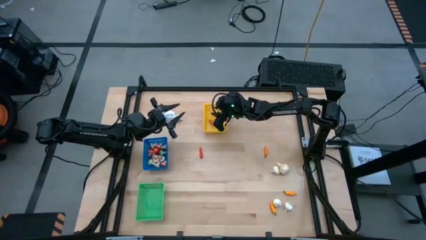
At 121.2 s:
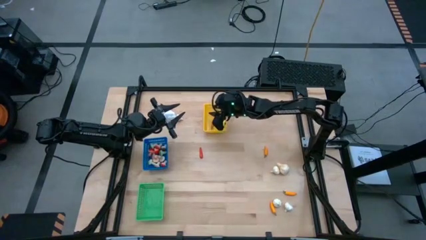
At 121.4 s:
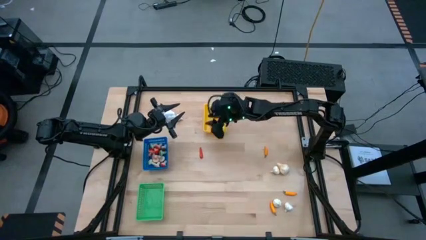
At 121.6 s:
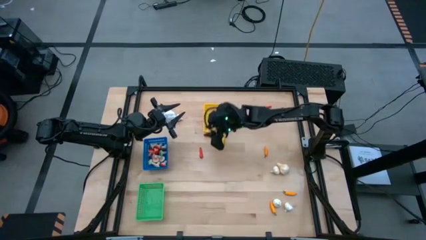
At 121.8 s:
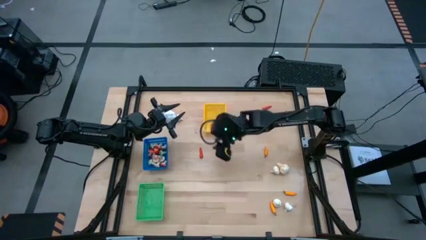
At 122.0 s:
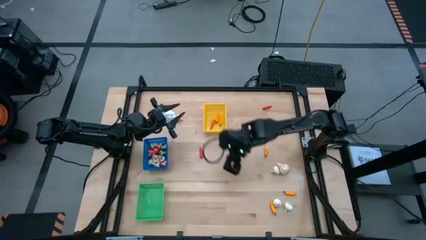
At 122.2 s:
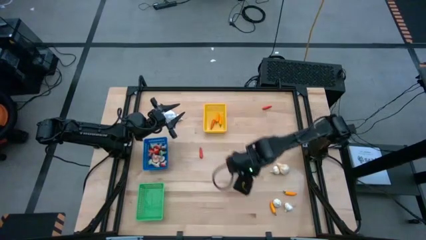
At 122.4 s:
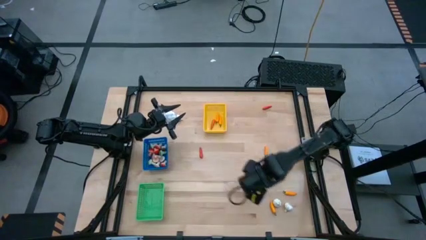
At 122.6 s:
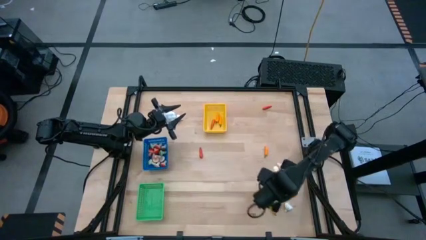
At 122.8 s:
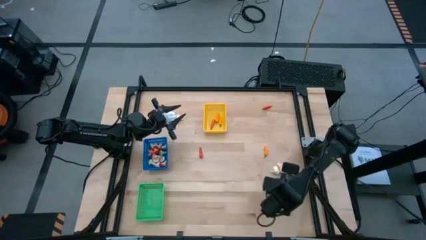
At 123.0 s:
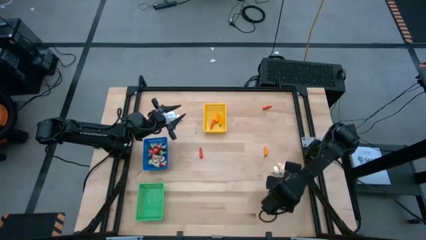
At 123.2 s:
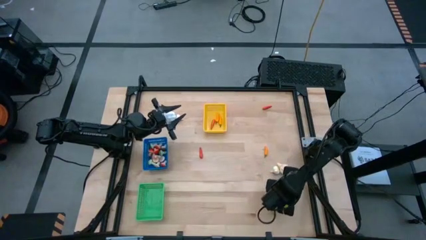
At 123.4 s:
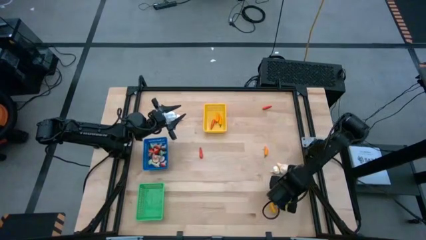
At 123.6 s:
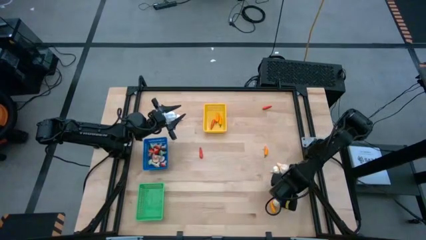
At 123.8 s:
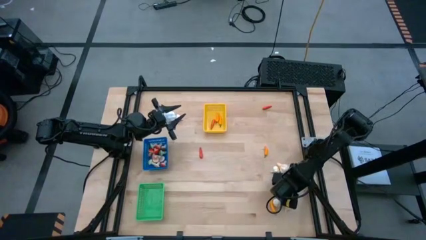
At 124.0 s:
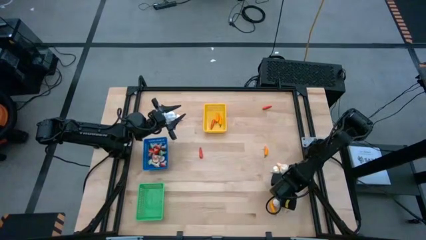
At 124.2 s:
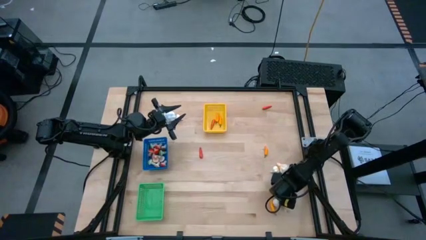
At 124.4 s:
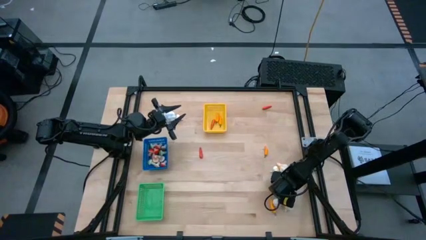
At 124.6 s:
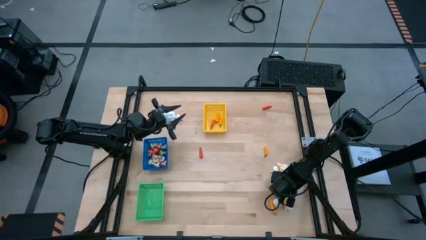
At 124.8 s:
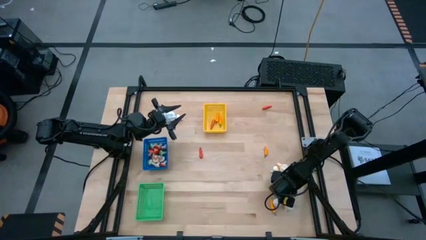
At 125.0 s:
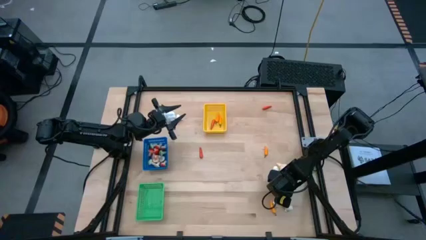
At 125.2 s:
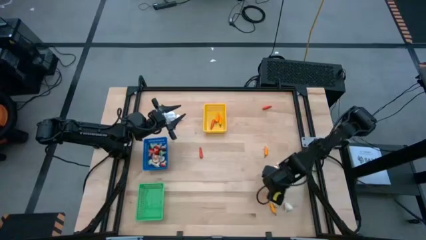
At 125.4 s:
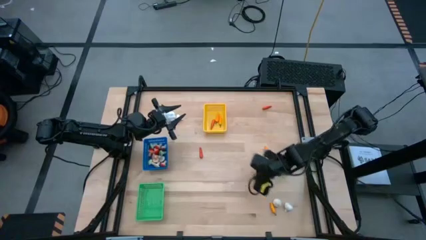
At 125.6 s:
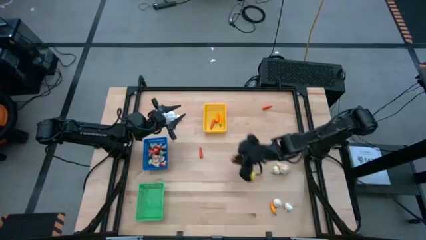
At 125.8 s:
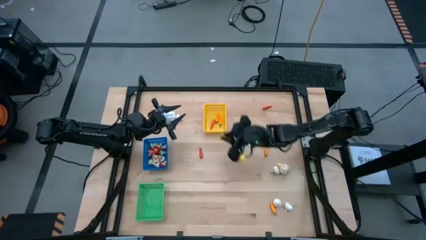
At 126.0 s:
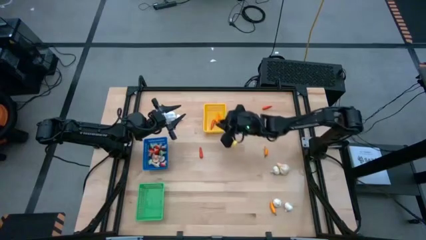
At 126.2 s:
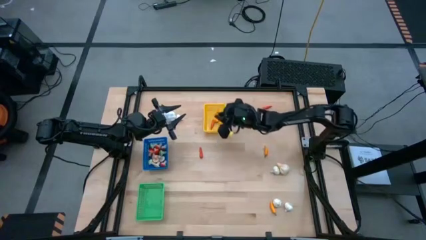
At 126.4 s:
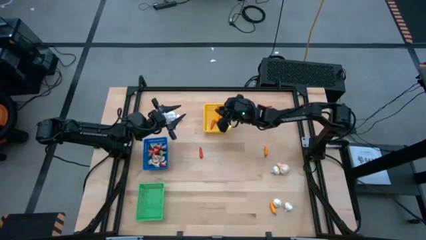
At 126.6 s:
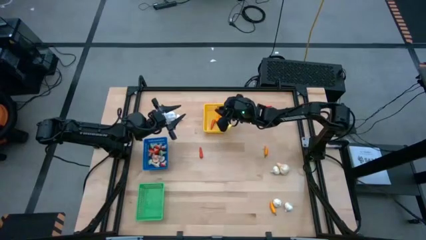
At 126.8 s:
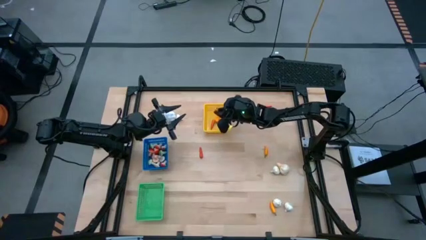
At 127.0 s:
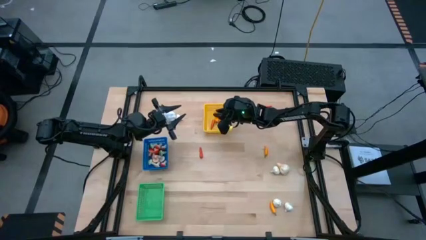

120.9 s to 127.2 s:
Task: Sort produce into baskets
Put the yellow chili pepper into the yellow bin

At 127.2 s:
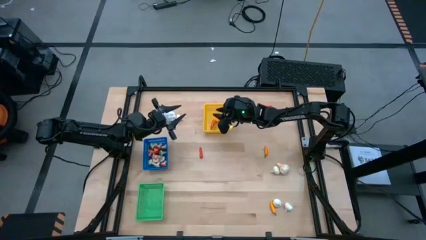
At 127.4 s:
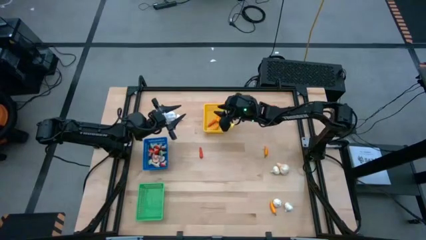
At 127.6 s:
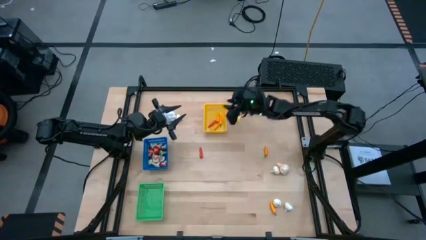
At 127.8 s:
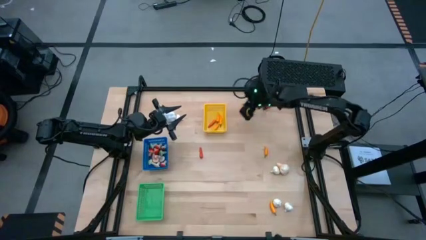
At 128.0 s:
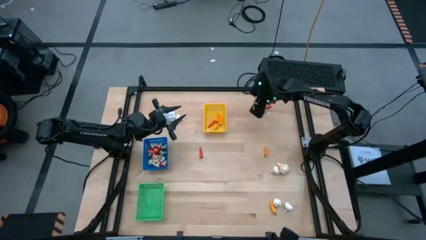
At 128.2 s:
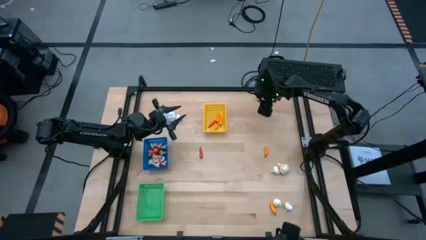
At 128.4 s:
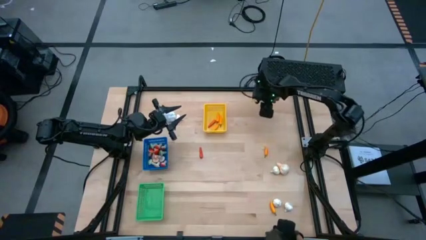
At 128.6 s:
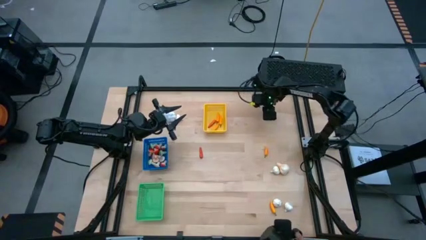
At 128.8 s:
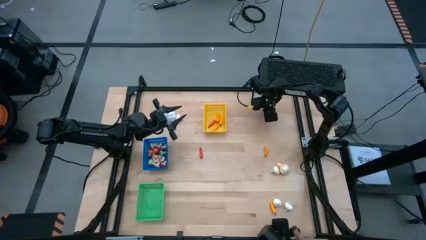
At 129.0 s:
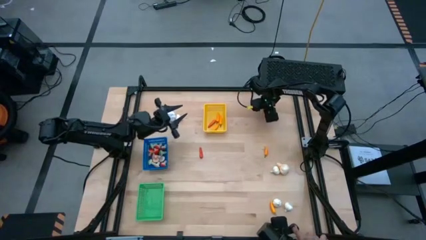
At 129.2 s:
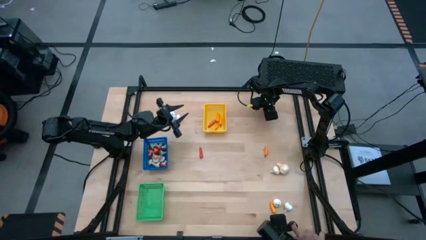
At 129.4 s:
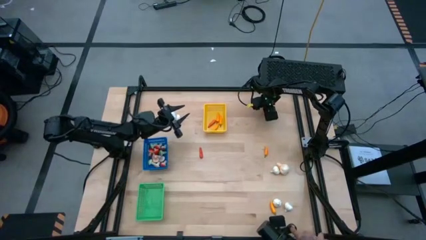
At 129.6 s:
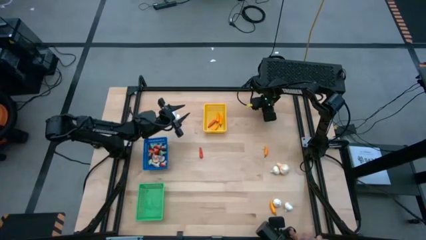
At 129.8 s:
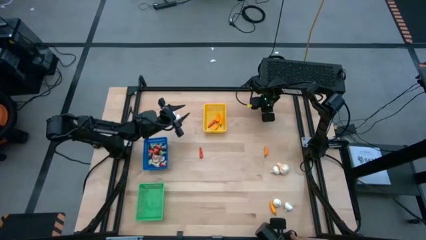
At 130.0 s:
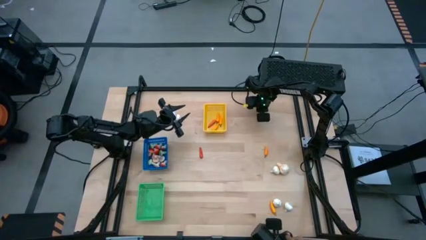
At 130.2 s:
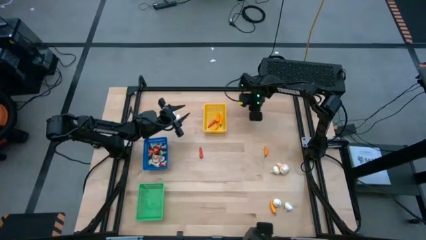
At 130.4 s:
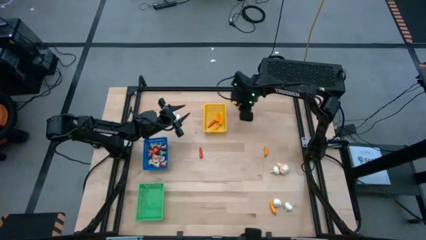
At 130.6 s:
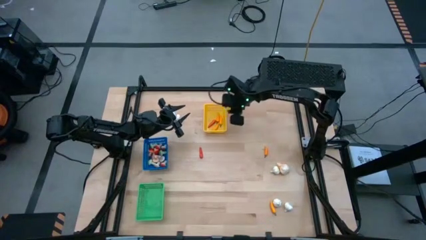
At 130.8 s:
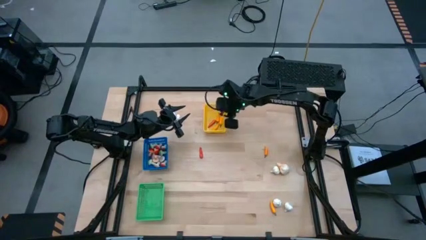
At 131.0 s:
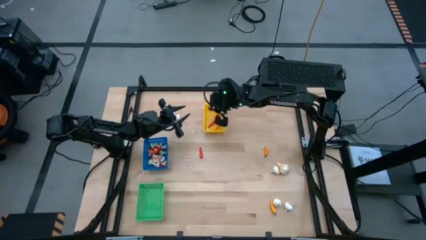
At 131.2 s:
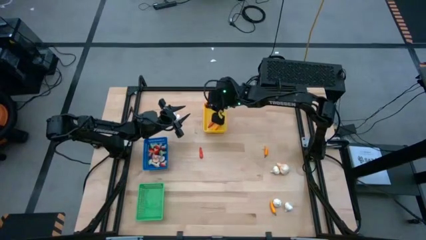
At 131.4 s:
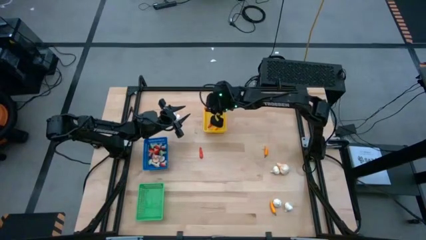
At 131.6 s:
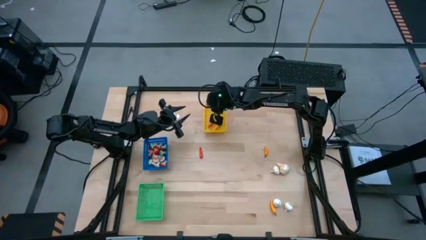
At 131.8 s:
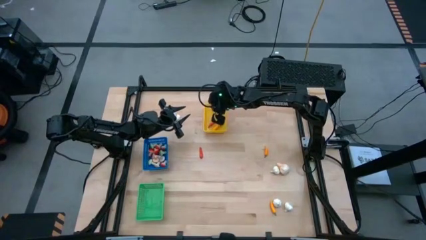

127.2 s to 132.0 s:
Put the orange chili pepper into the yellow bin

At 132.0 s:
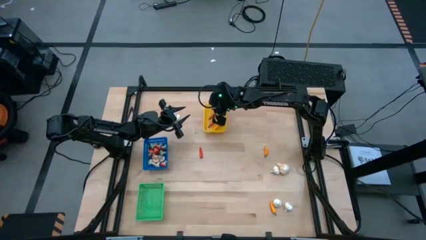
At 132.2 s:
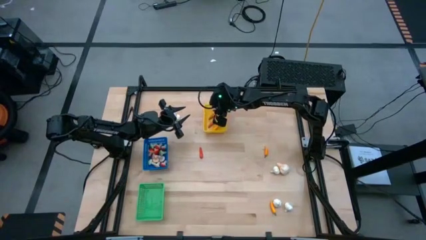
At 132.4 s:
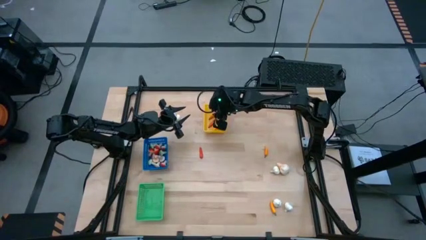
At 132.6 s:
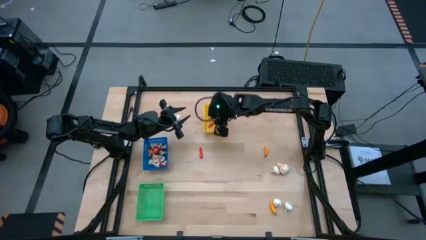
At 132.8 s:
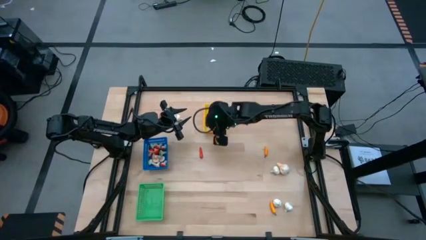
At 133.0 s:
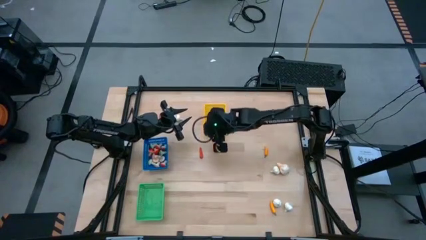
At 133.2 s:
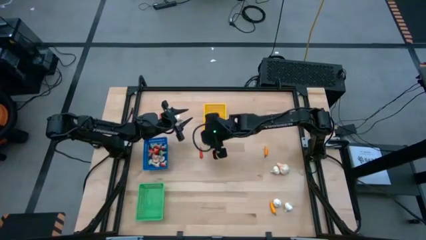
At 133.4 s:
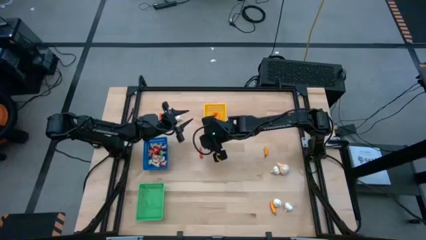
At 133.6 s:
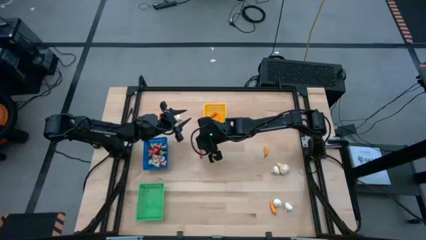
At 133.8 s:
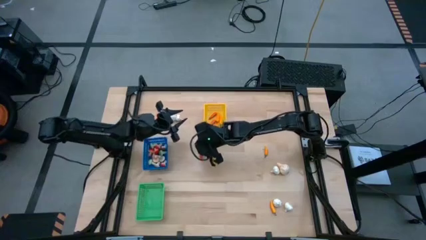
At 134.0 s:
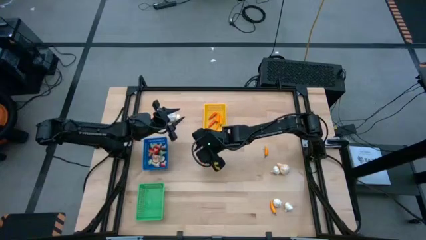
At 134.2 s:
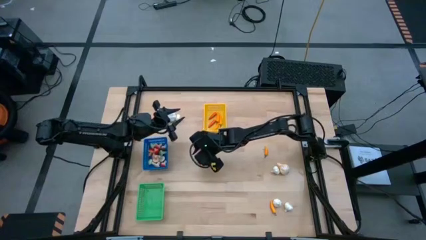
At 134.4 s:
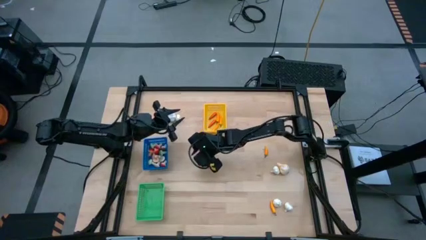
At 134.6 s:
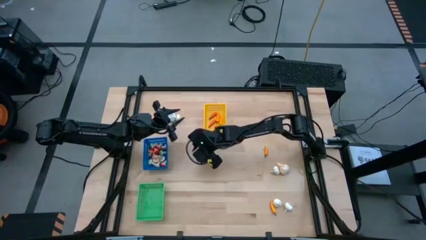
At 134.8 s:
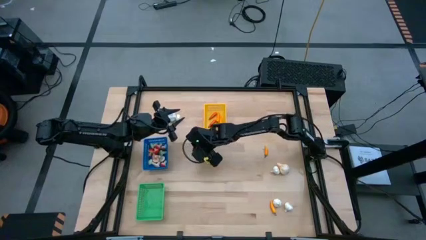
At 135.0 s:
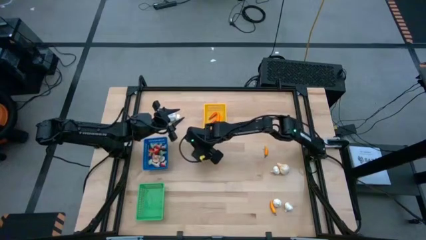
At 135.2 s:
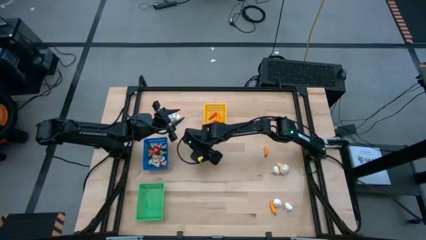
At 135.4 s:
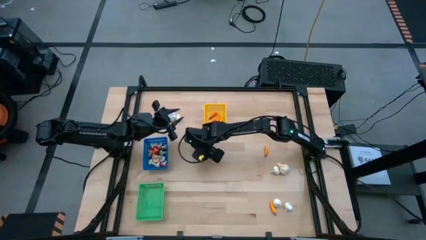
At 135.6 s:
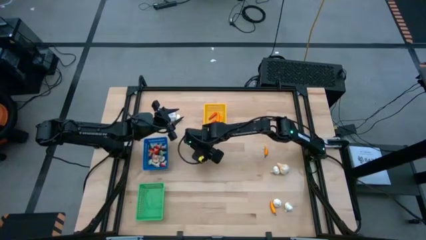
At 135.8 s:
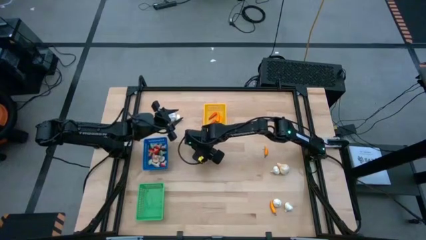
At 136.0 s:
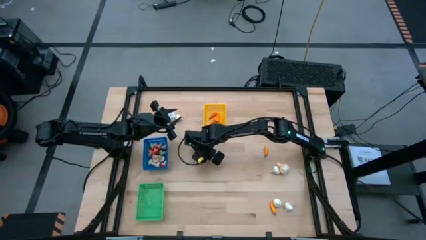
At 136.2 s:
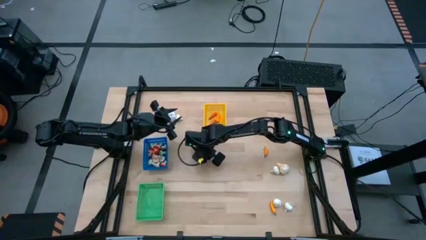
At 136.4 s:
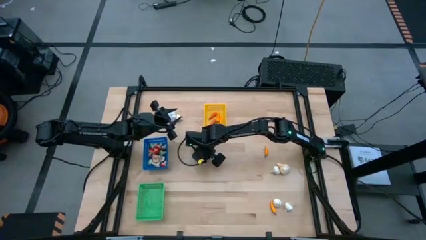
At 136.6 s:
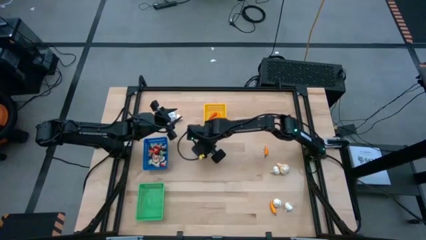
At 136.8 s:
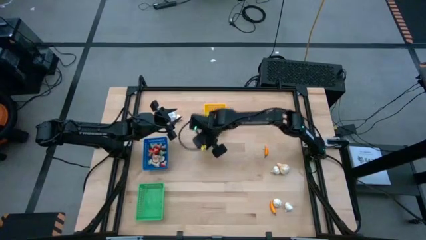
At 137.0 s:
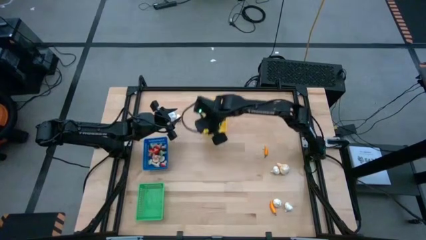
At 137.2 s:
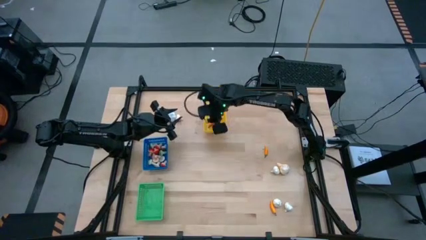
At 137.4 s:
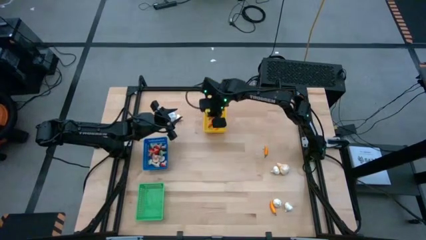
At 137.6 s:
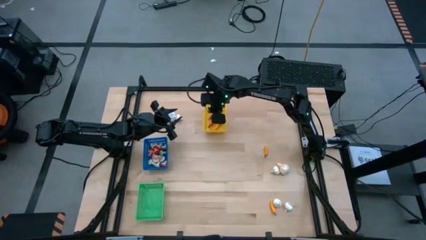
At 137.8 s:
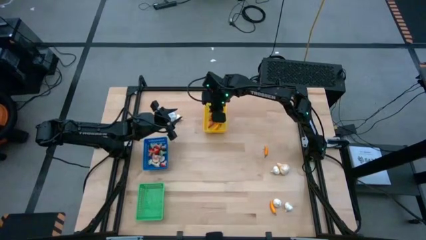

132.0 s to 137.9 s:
Put the orange chili pepper into the yellow bin
